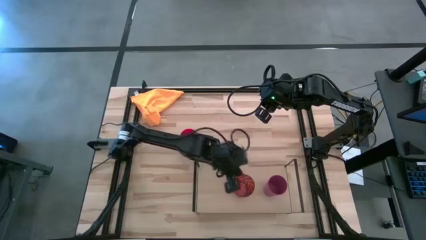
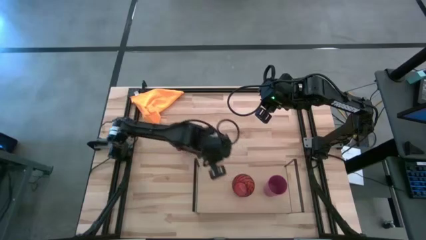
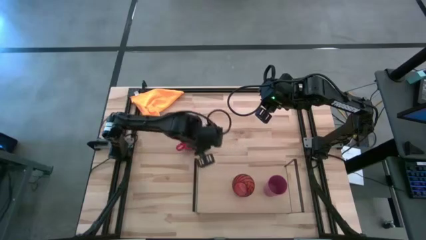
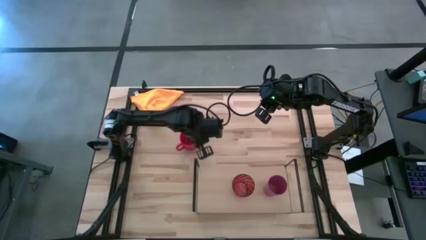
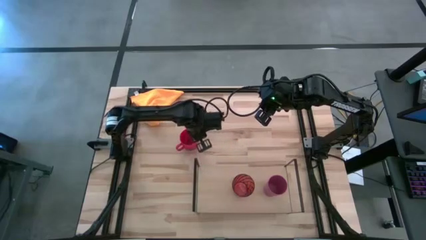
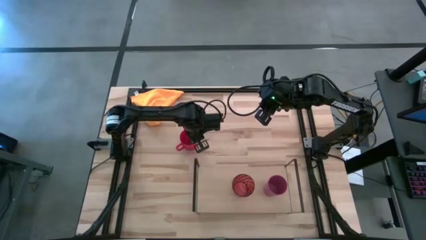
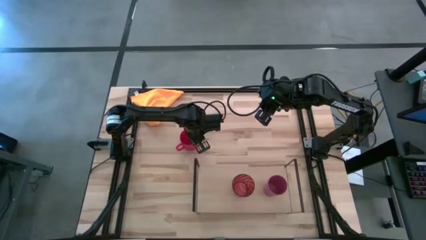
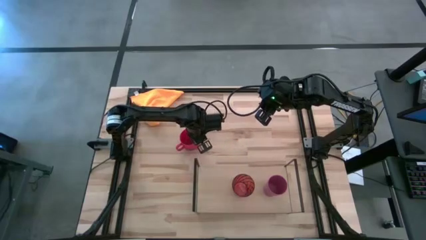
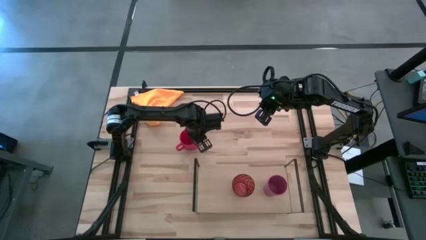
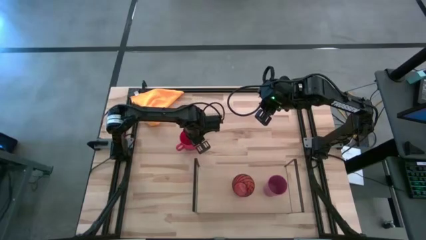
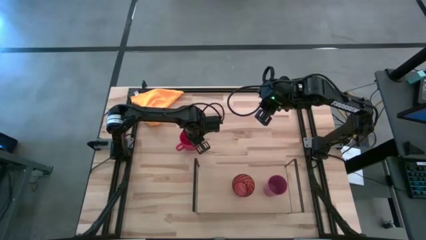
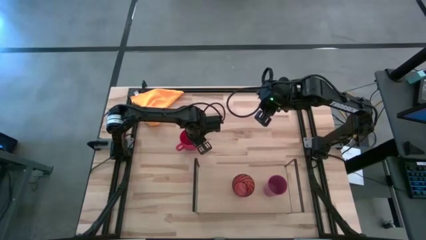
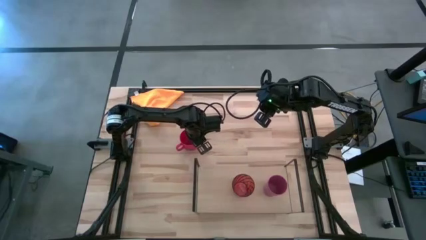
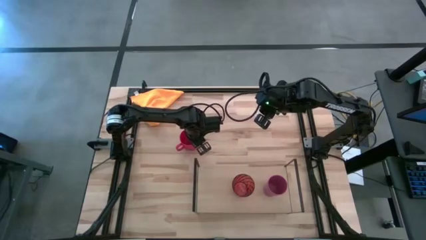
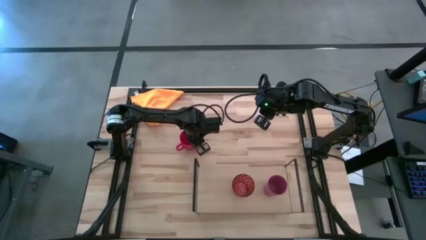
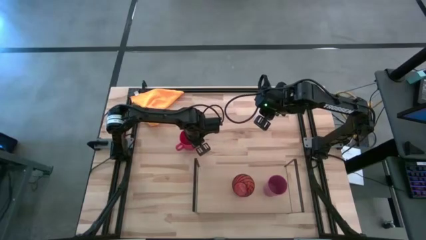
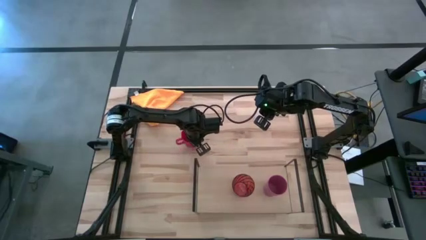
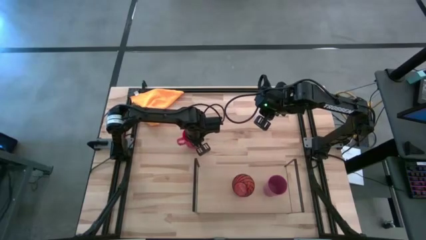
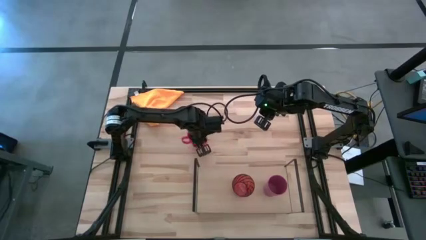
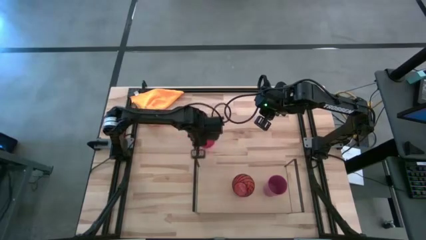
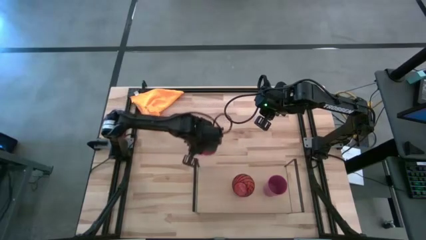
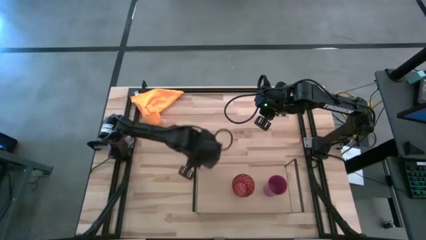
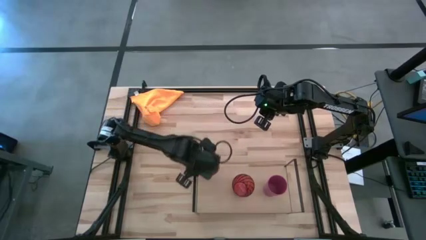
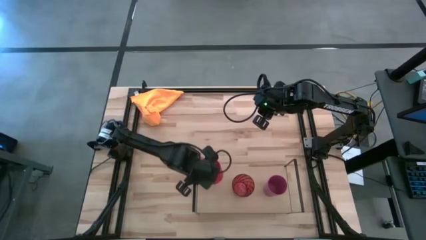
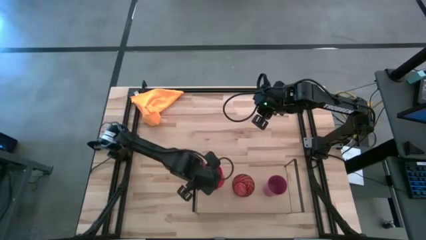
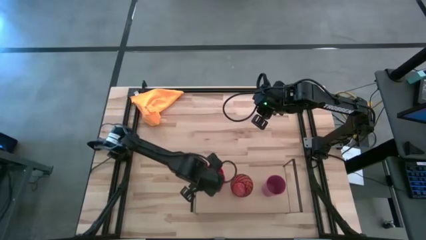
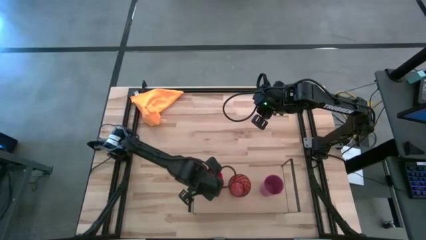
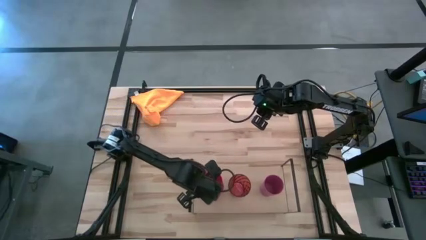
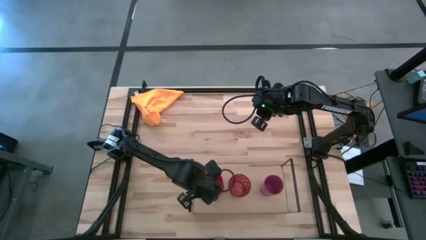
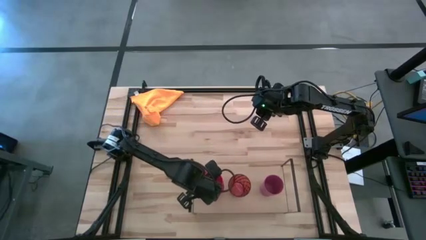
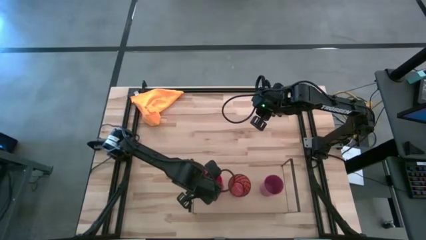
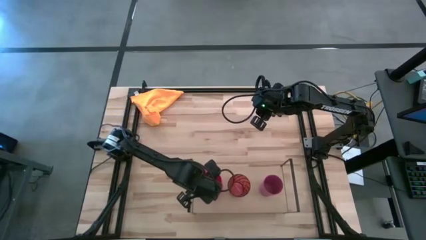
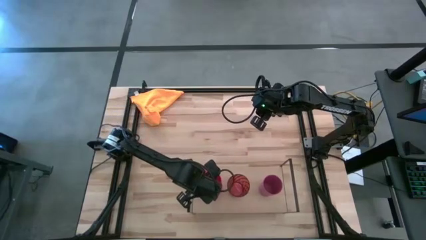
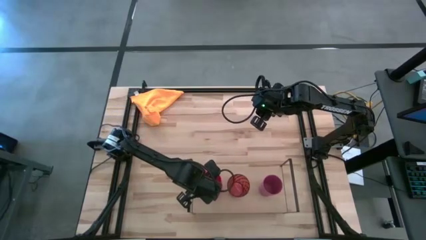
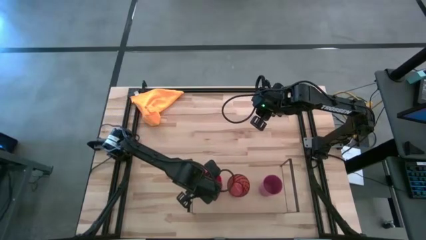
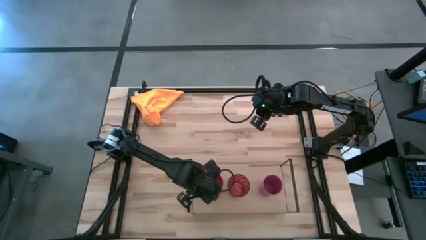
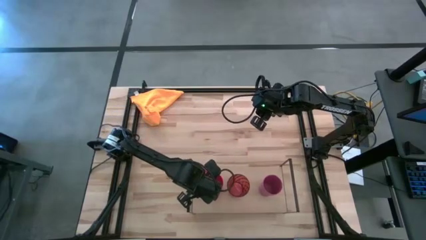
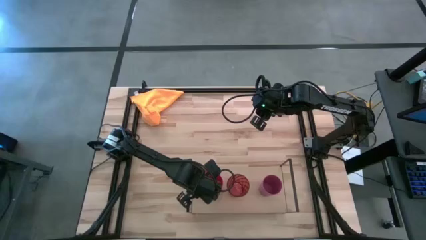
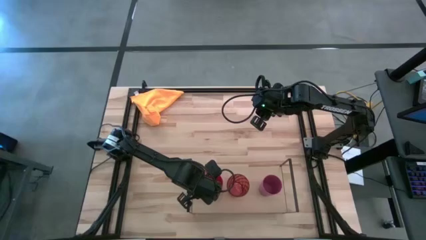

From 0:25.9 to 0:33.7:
Task: Stack small to large cups/mugs on shelf
Put the orange mug on the shelf

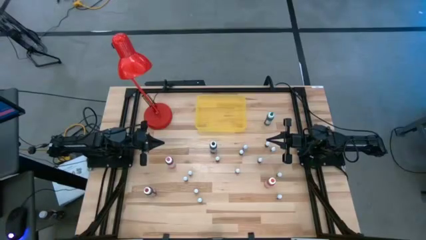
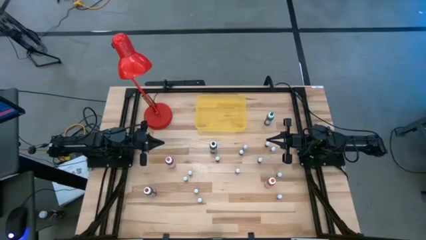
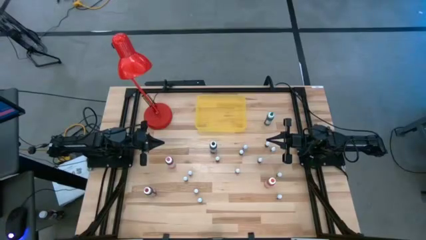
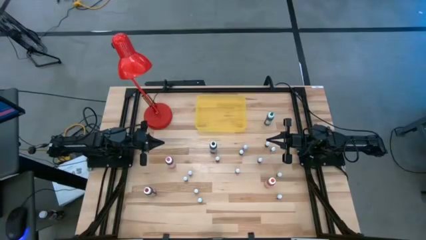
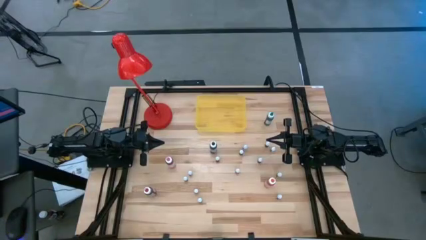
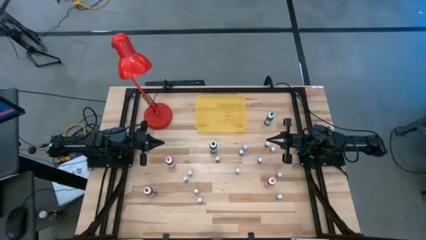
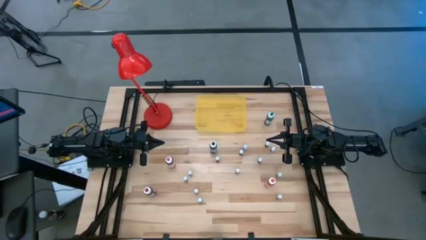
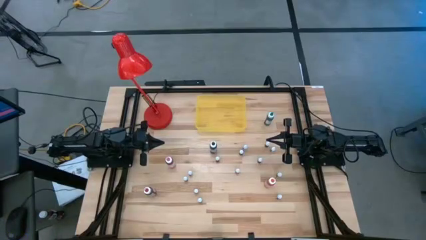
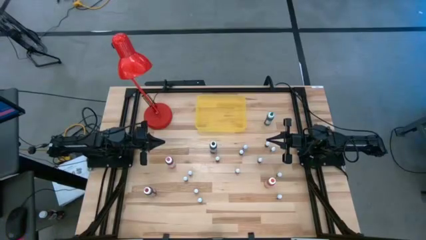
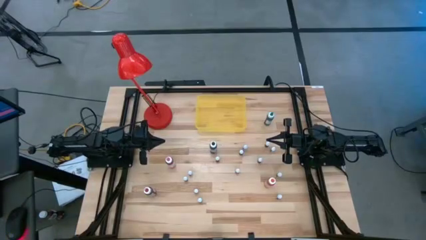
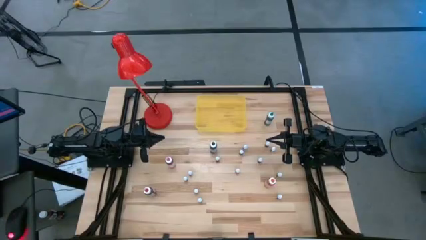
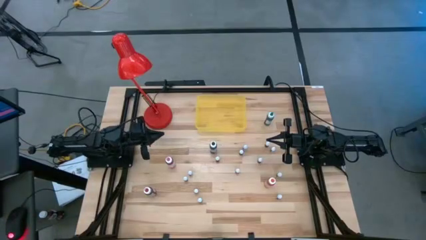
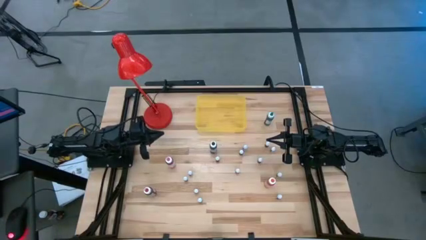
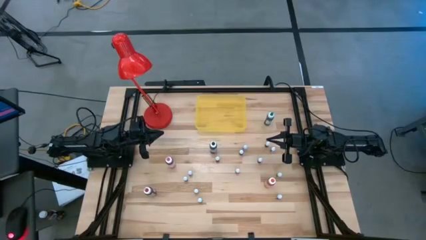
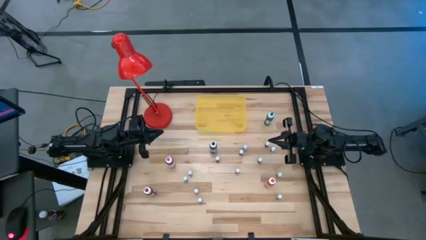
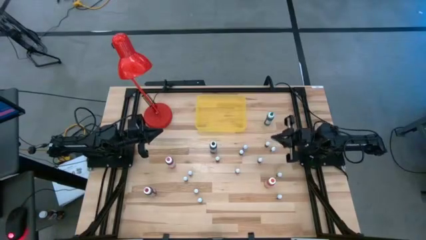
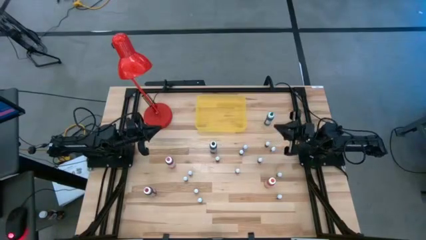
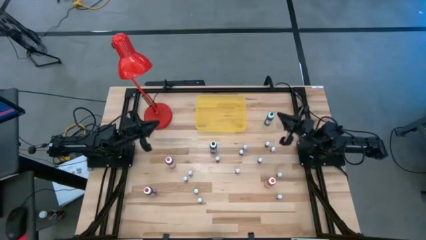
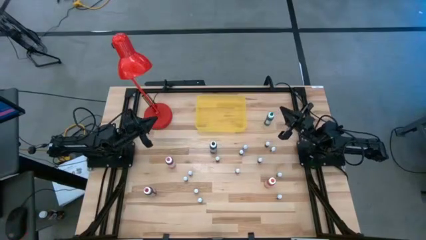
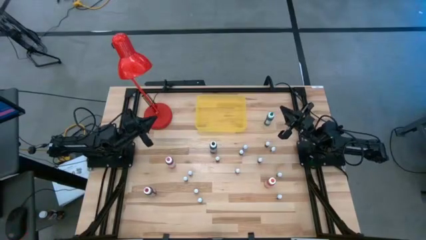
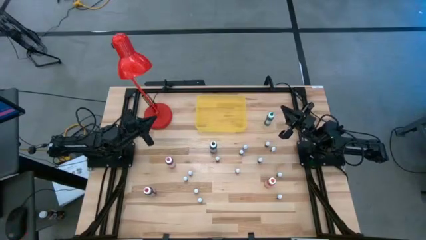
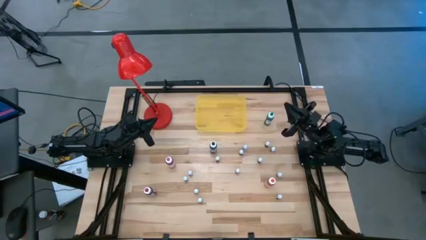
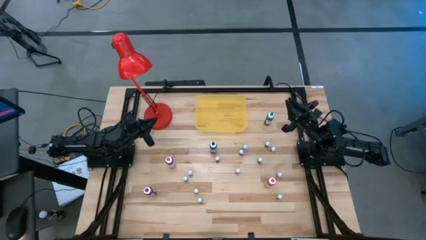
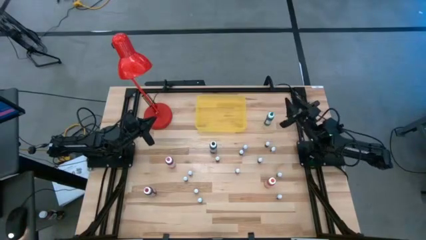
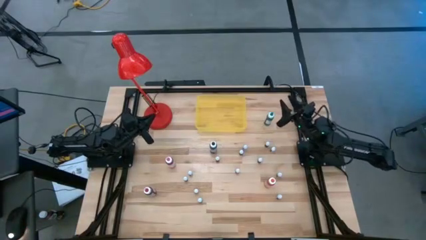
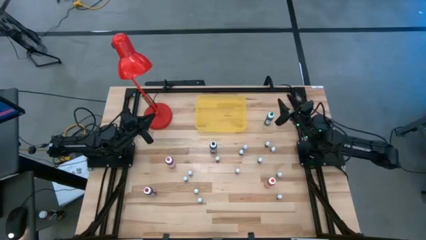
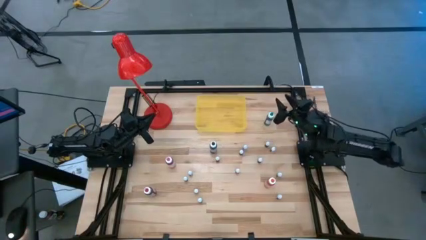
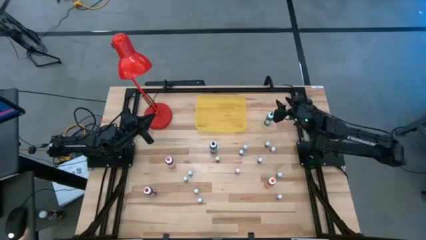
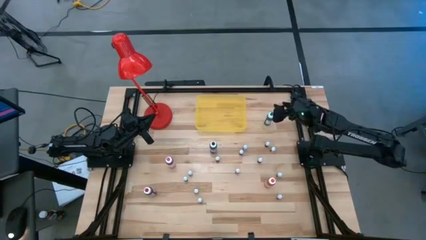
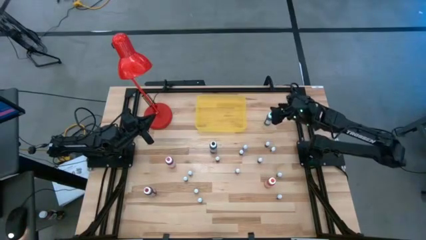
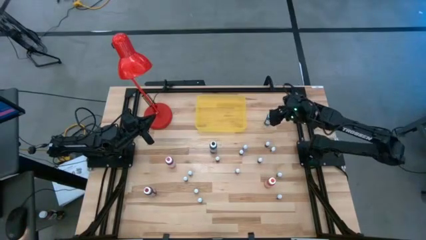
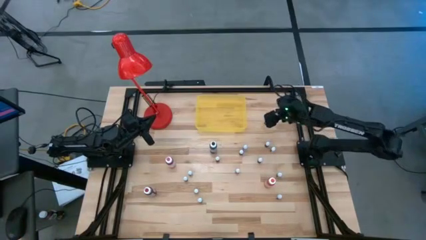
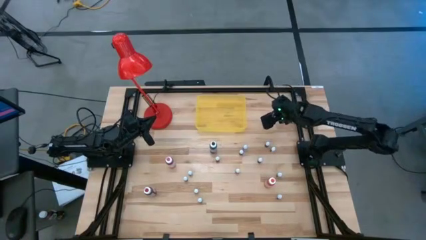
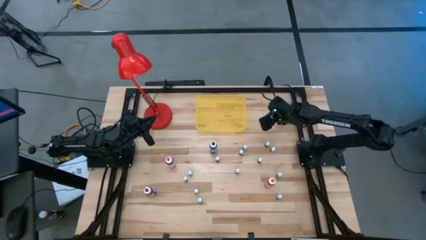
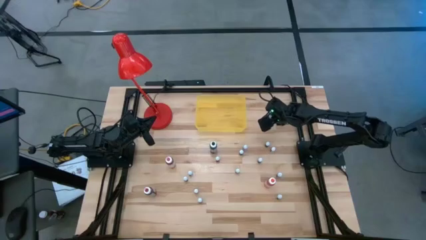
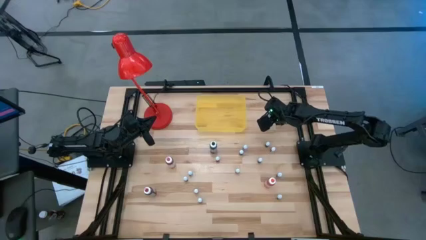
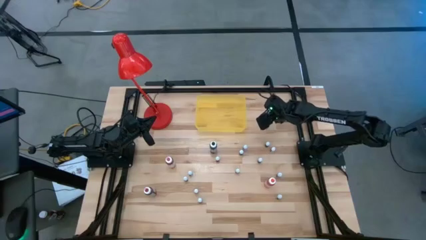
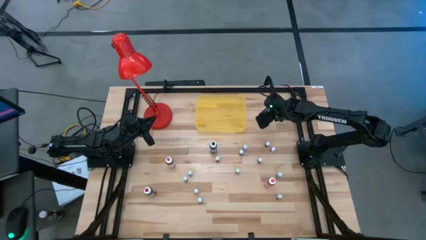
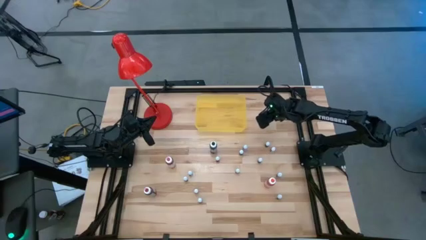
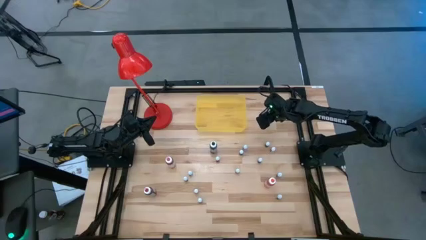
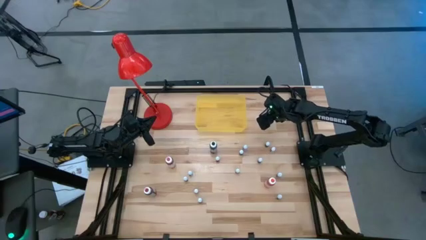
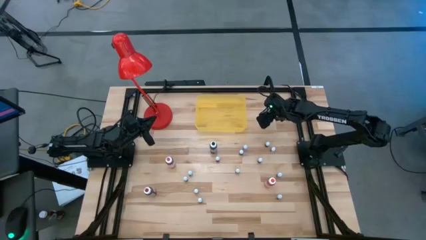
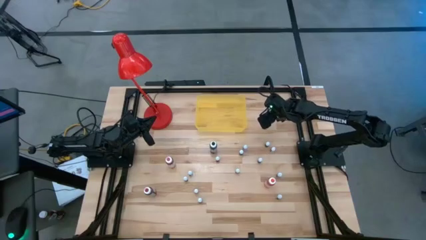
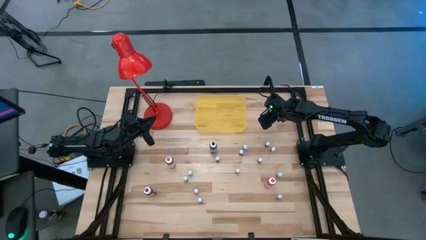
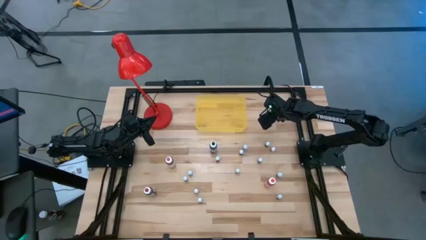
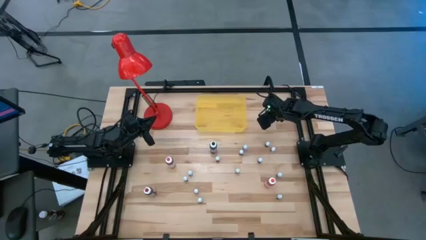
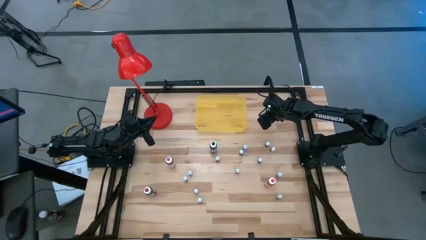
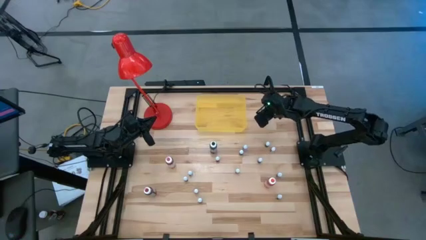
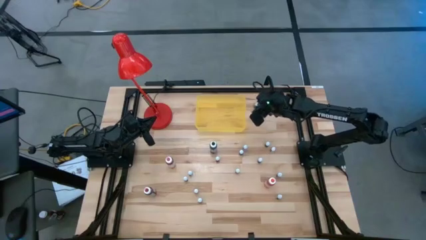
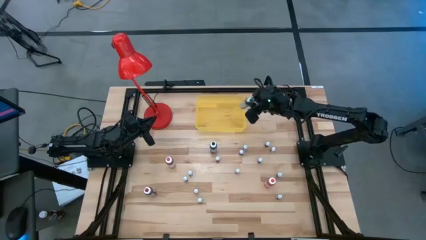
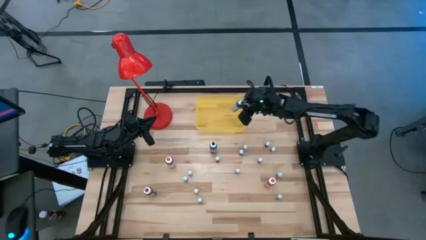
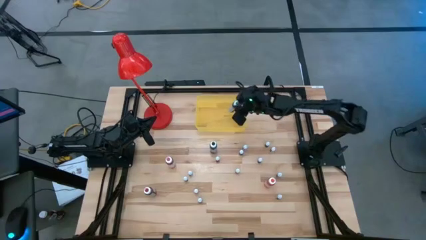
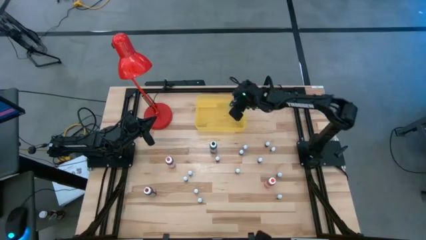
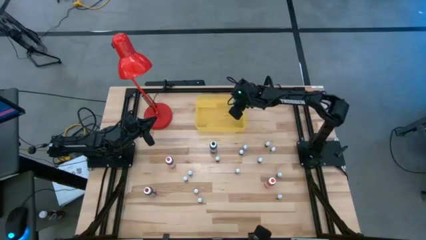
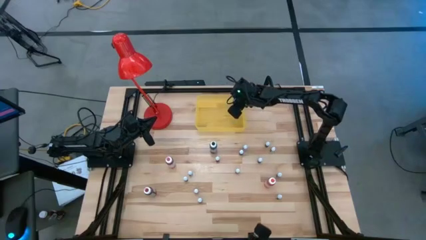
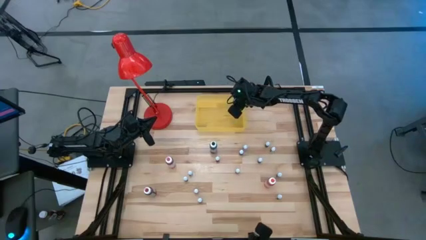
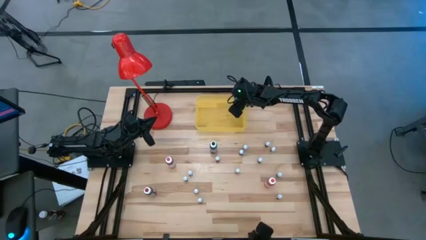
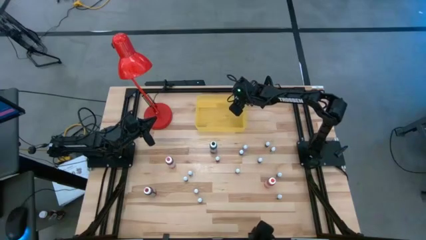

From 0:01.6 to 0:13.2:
Task: Pick & Place food coloring
Put the large green food coloring bottle into the yellow bin
